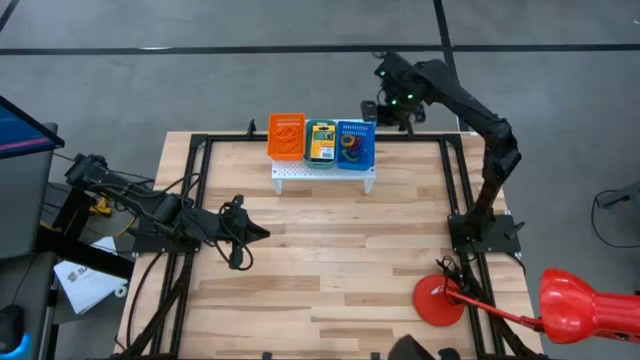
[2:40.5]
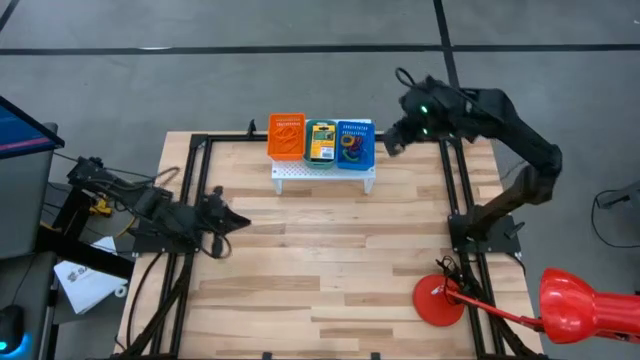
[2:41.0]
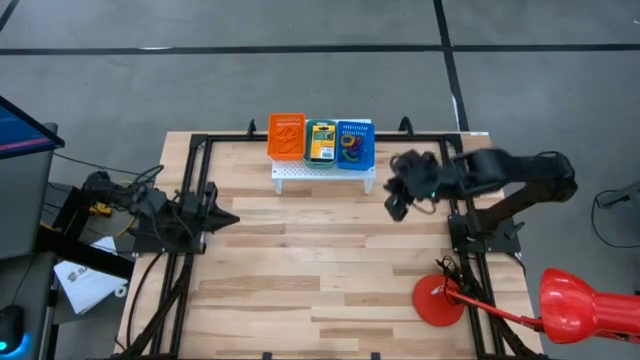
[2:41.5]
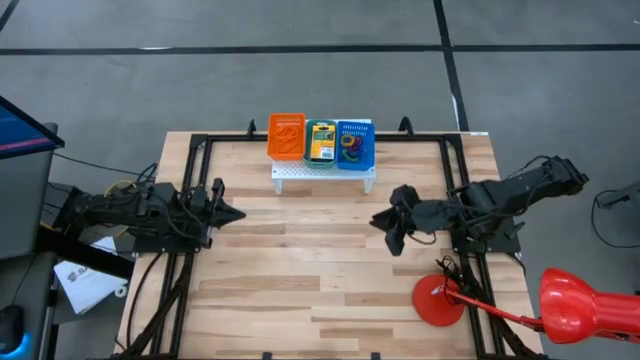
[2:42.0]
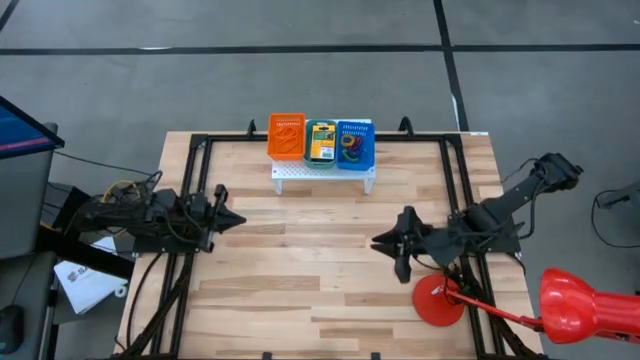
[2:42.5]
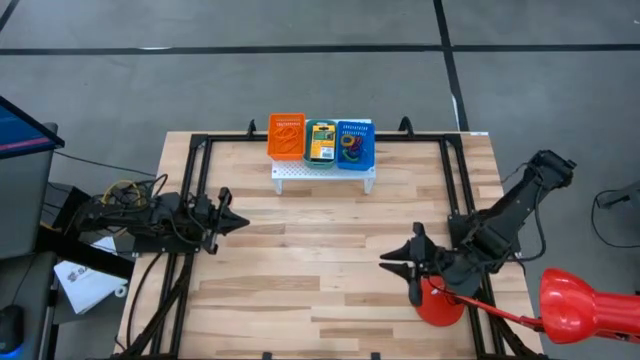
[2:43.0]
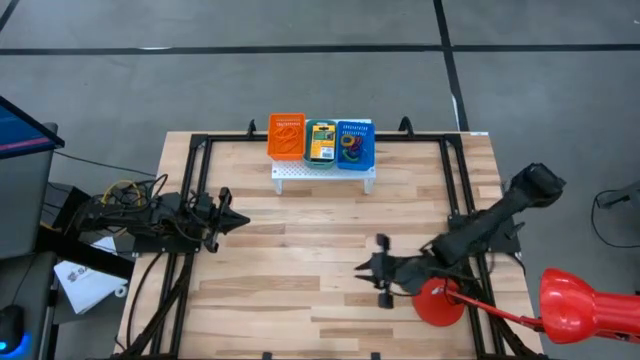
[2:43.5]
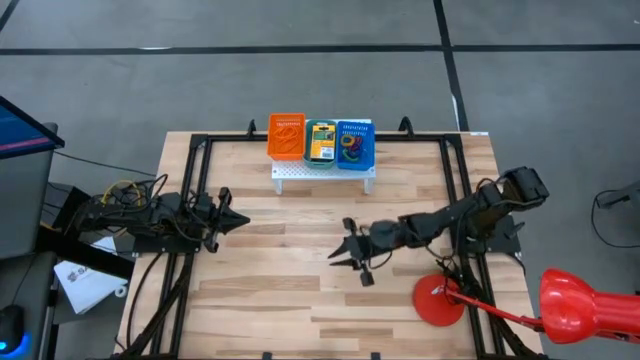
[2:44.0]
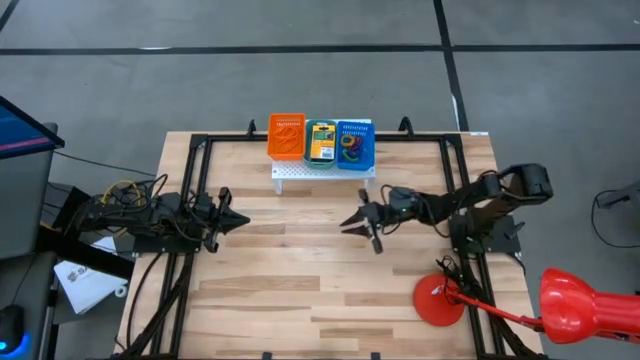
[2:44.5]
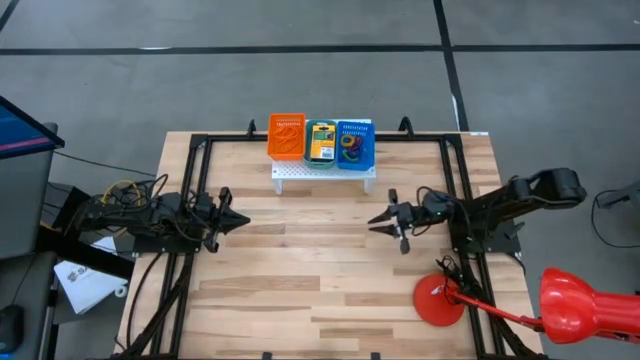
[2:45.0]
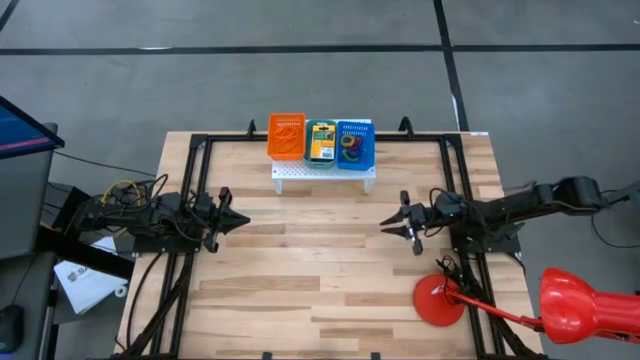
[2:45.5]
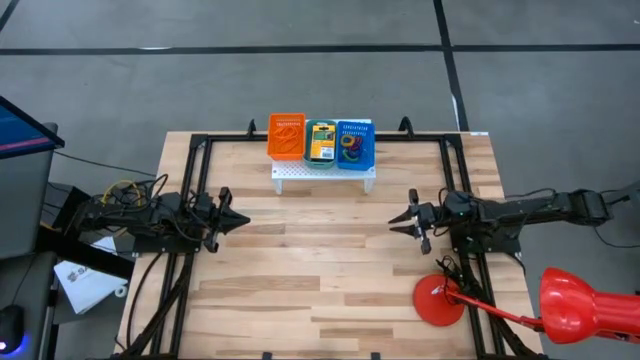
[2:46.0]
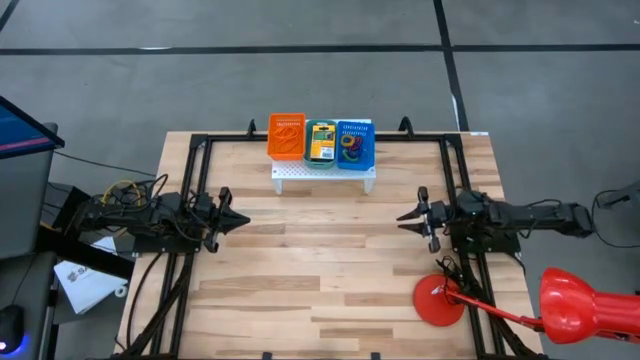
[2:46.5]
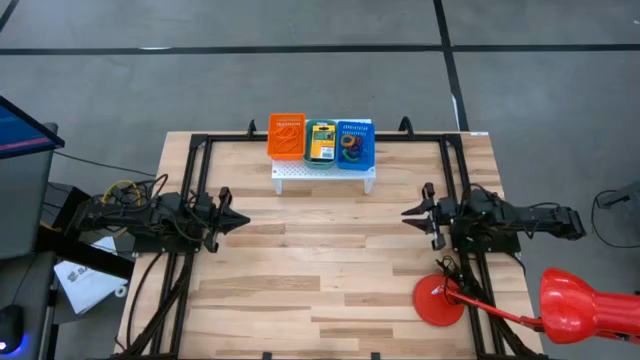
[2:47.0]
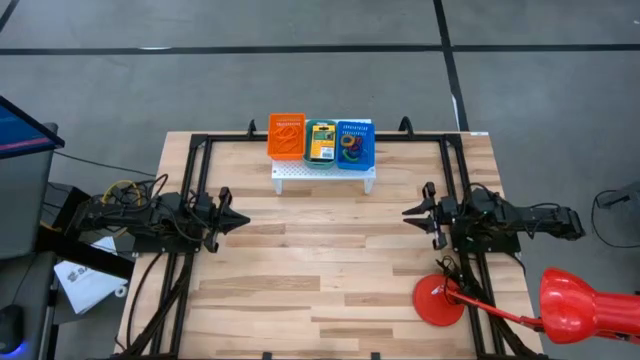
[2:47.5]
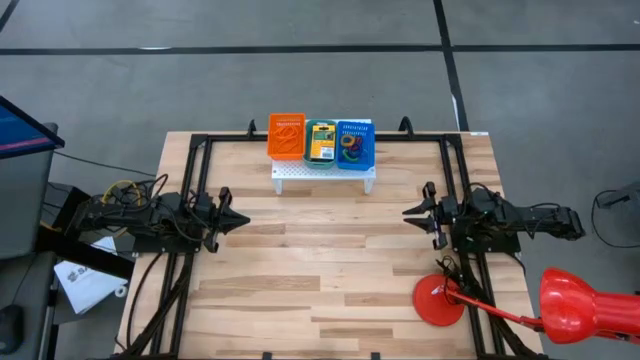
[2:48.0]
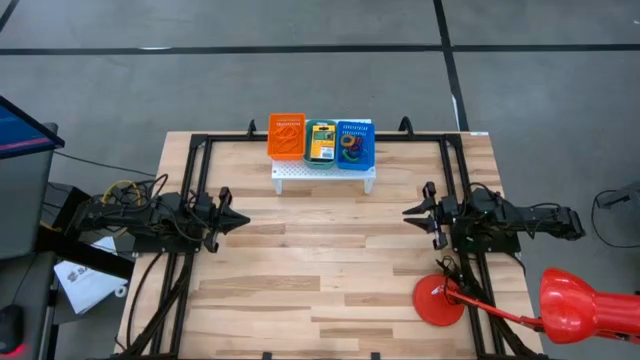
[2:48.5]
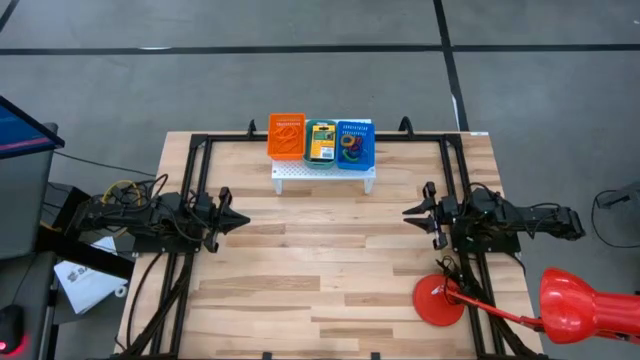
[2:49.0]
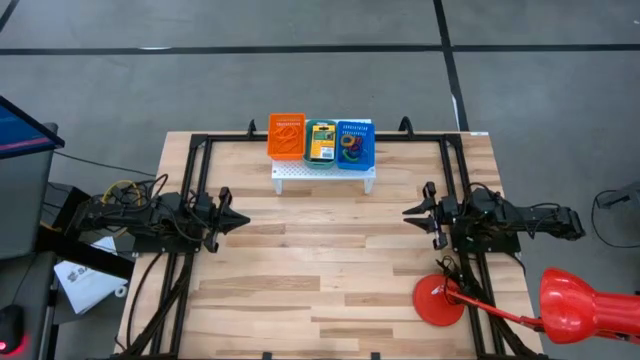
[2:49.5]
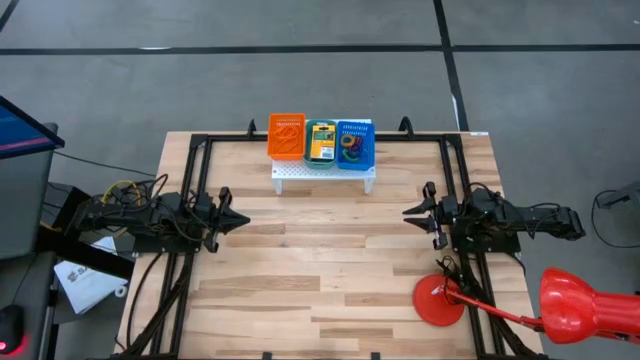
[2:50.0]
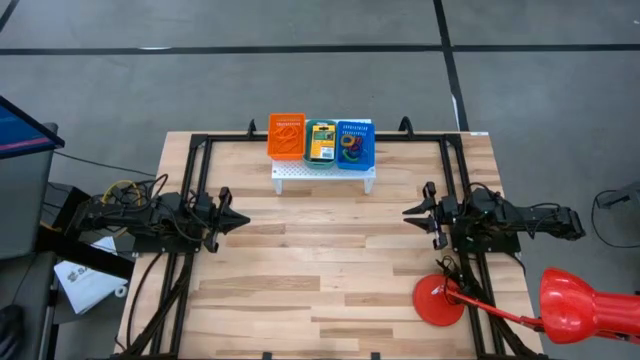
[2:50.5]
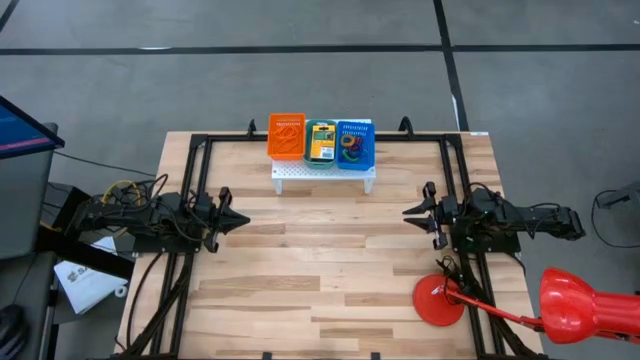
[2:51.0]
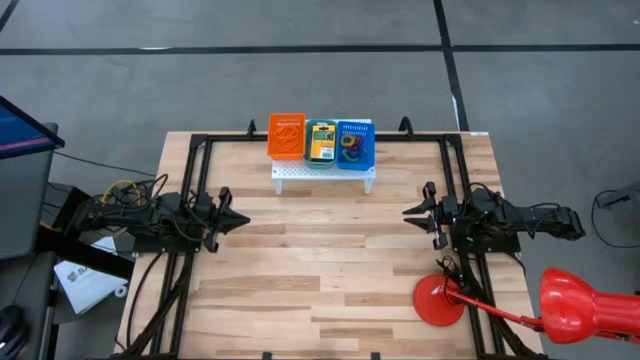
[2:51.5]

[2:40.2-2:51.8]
Task: Pick & Place Office Desk Supplies
Return to Home Position

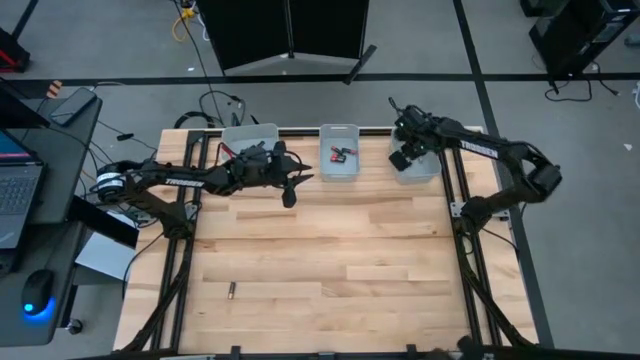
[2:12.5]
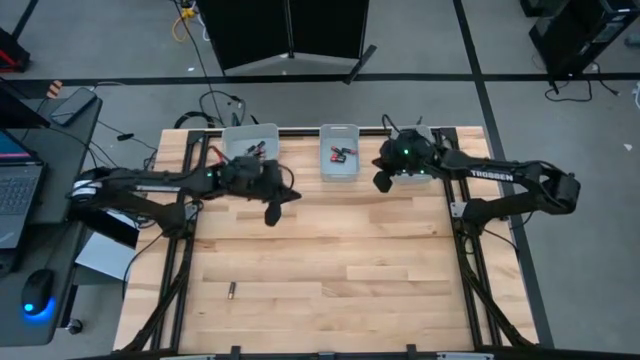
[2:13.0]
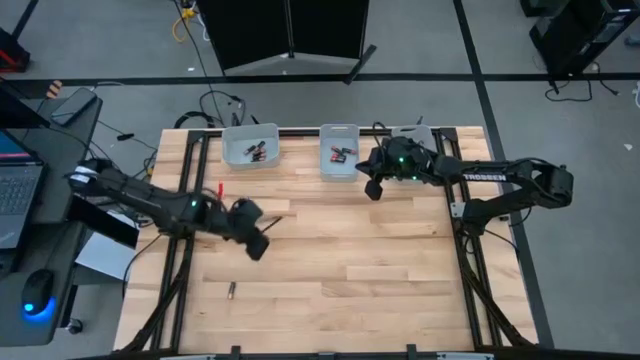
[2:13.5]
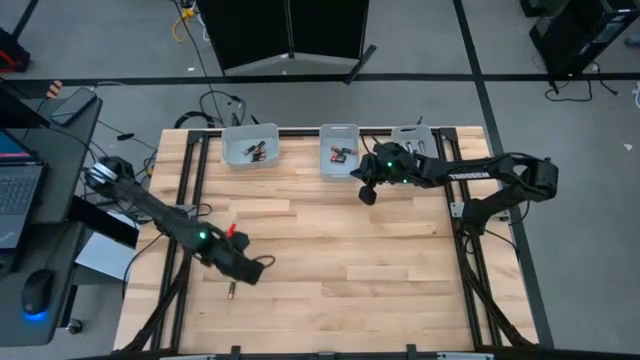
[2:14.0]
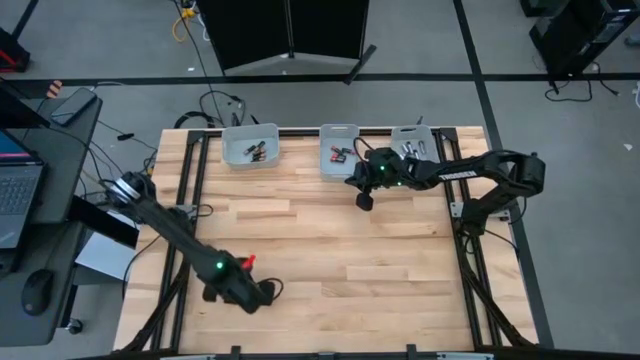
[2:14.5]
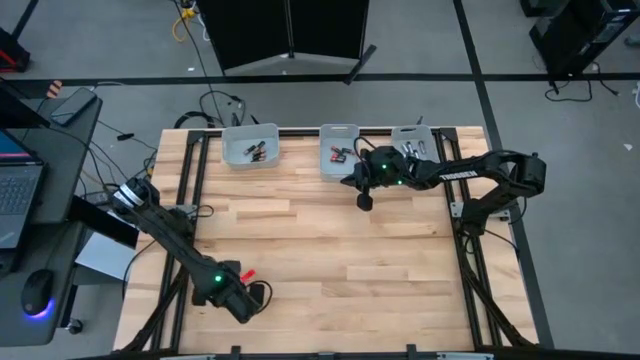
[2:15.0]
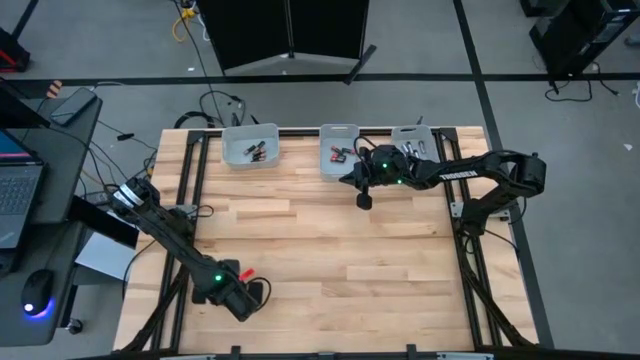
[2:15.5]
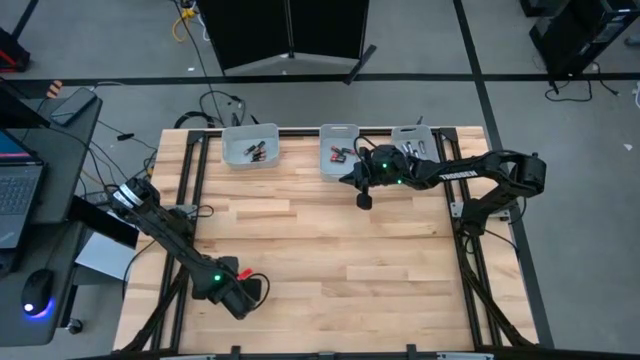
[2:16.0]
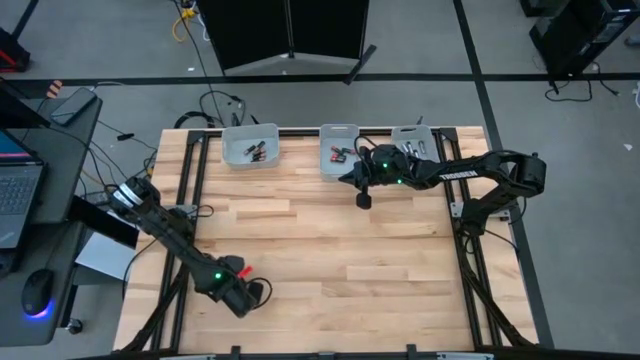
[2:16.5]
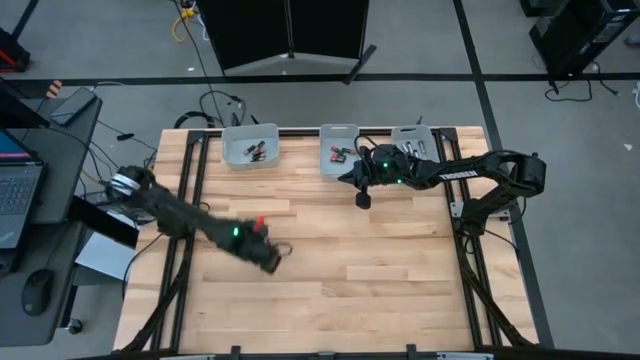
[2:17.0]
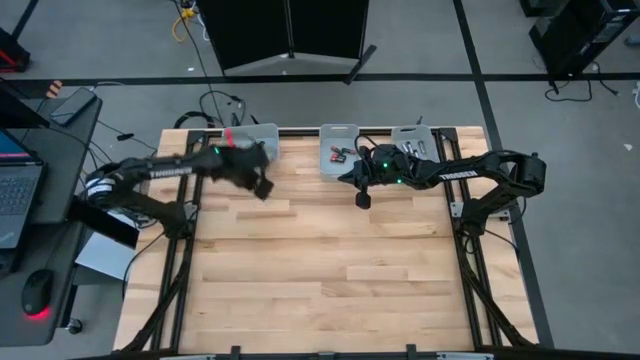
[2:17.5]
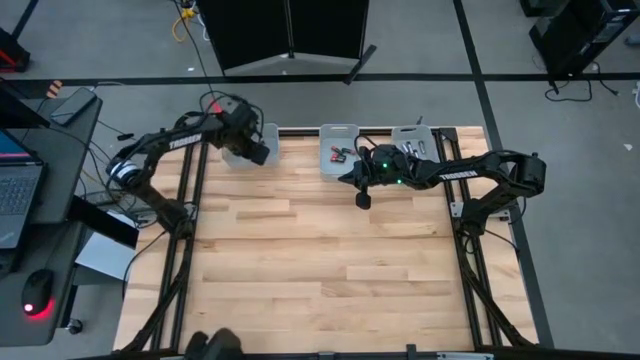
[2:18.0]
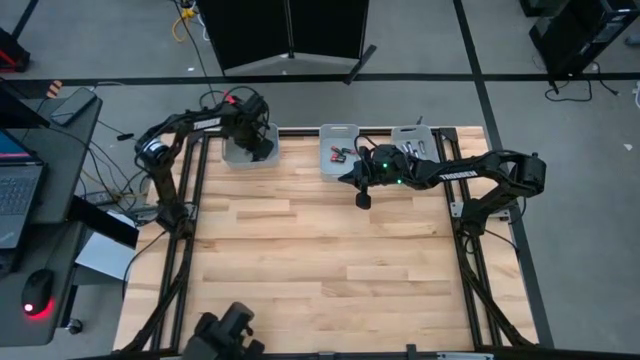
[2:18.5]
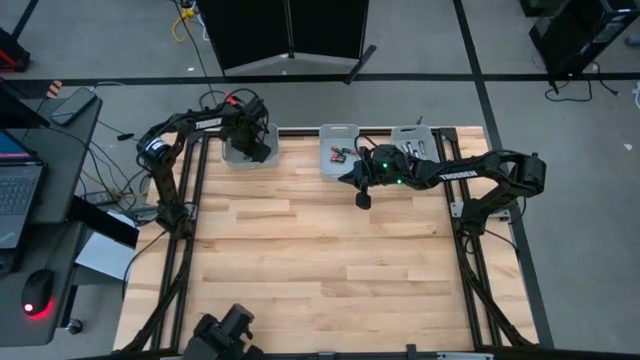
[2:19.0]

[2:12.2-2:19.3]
Task: Sort batteries
Put the black brown battery into the left bin
